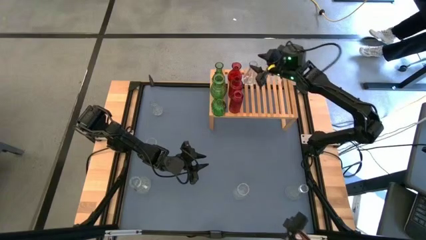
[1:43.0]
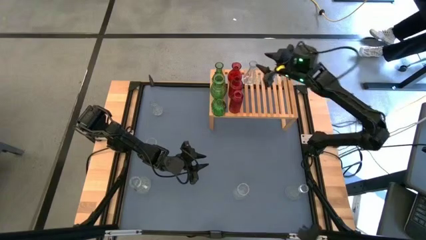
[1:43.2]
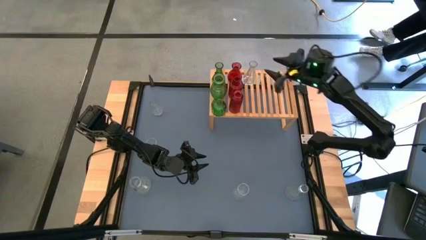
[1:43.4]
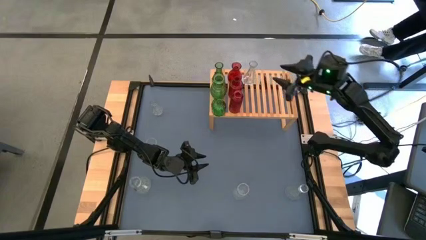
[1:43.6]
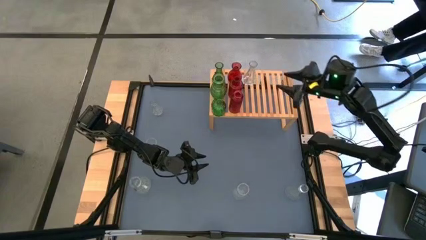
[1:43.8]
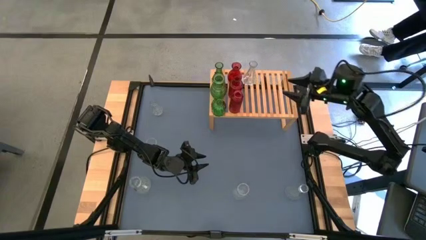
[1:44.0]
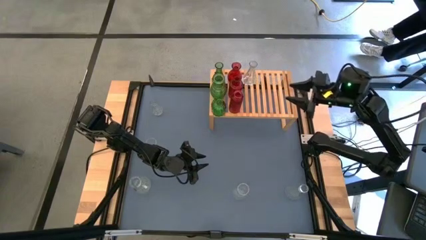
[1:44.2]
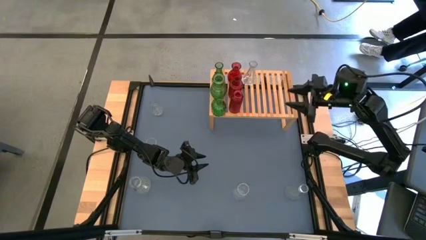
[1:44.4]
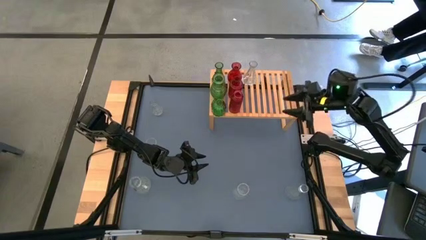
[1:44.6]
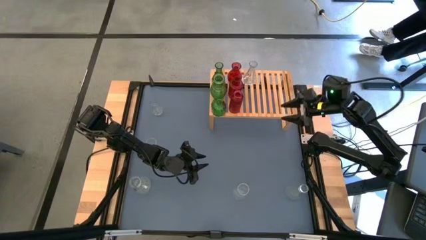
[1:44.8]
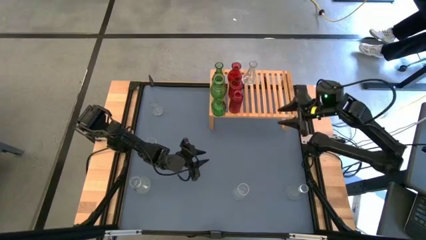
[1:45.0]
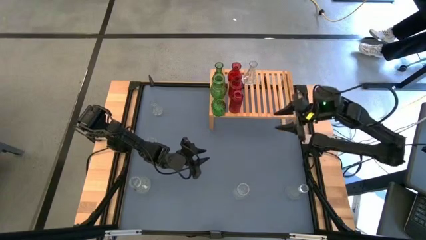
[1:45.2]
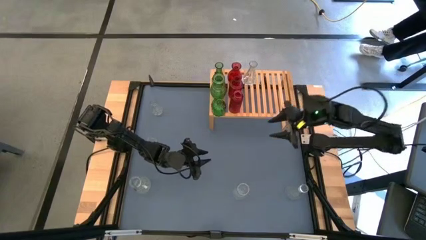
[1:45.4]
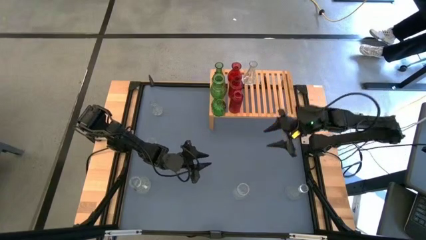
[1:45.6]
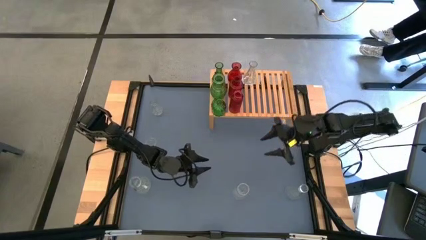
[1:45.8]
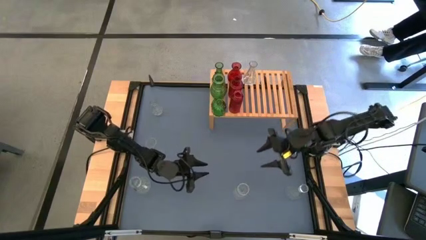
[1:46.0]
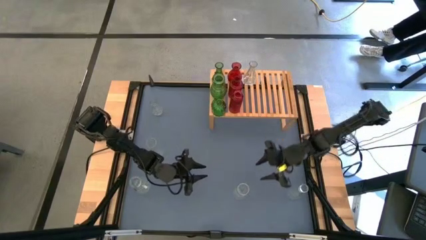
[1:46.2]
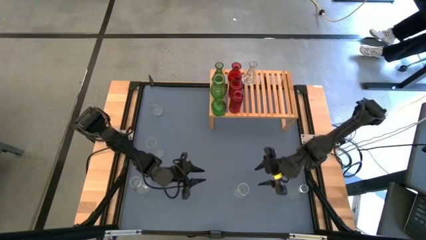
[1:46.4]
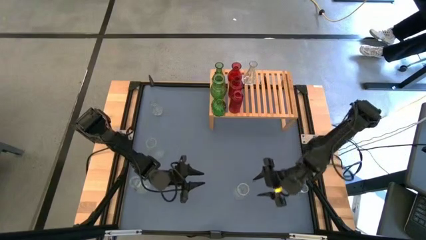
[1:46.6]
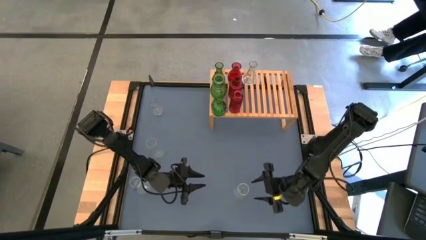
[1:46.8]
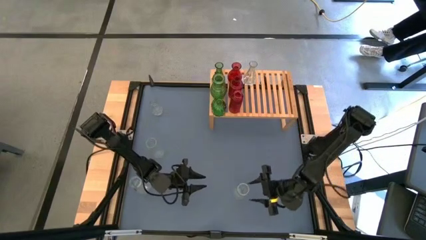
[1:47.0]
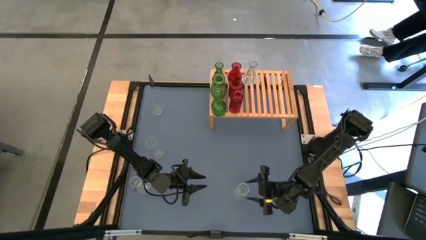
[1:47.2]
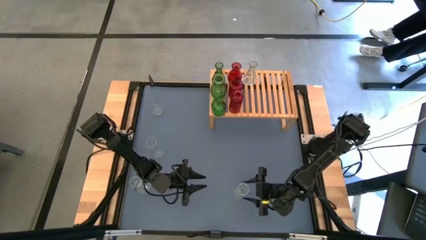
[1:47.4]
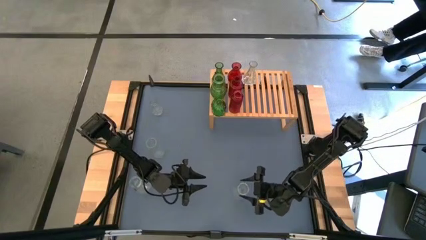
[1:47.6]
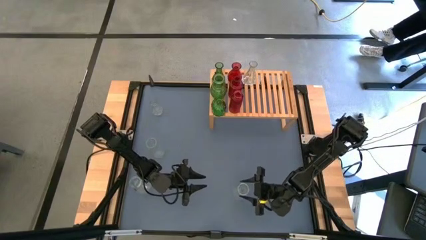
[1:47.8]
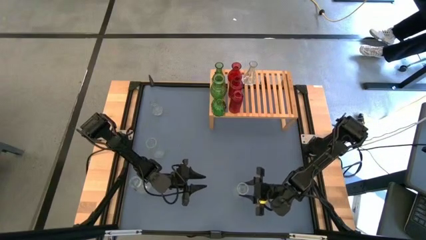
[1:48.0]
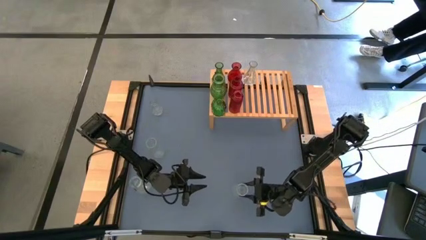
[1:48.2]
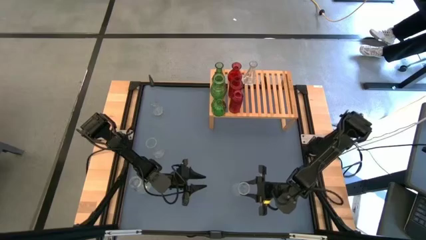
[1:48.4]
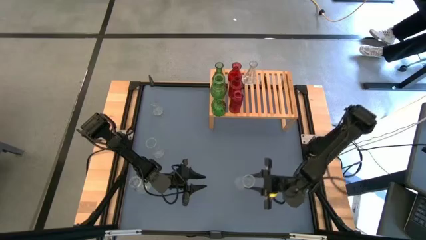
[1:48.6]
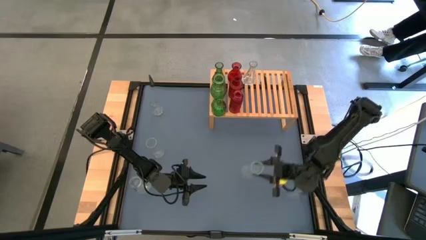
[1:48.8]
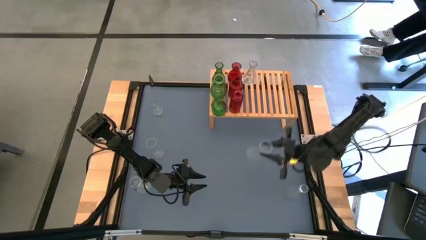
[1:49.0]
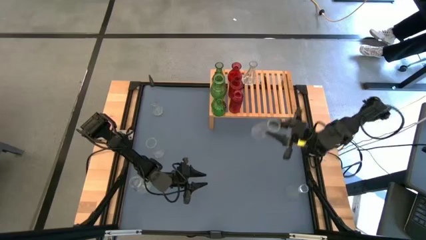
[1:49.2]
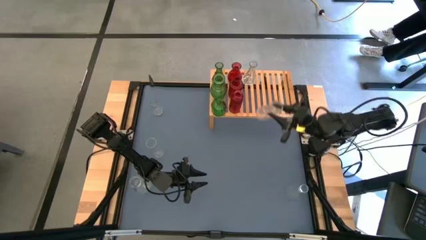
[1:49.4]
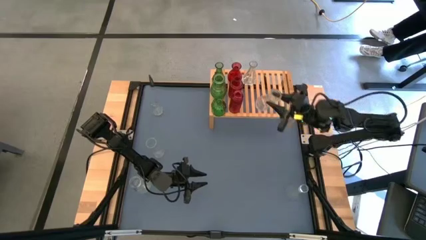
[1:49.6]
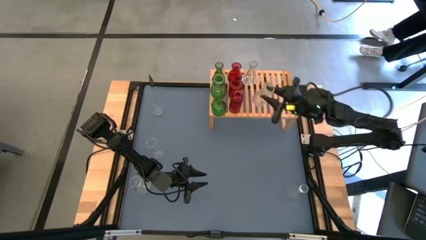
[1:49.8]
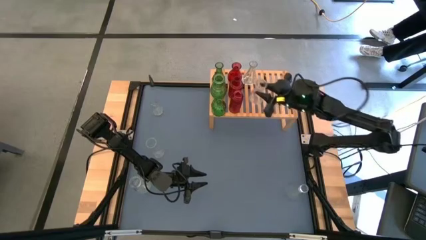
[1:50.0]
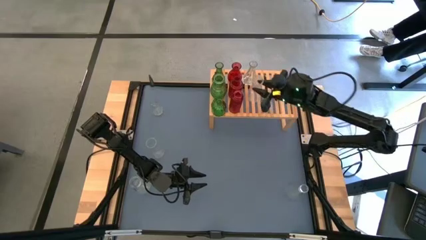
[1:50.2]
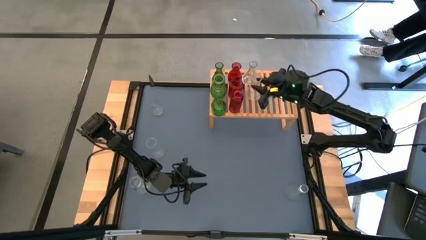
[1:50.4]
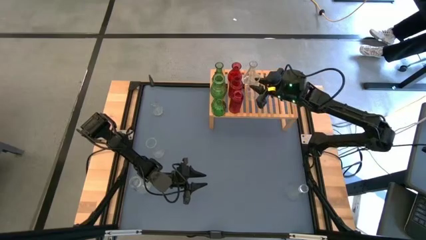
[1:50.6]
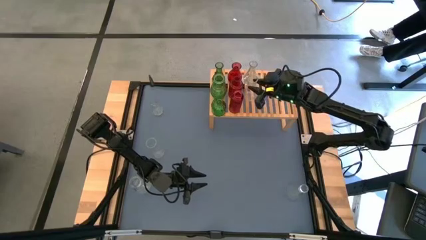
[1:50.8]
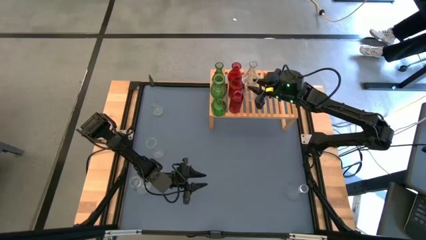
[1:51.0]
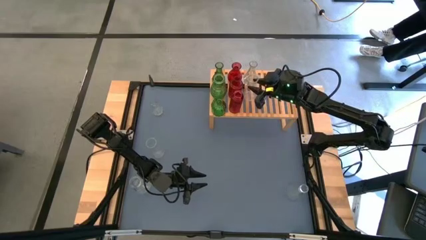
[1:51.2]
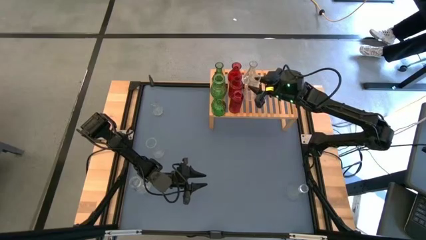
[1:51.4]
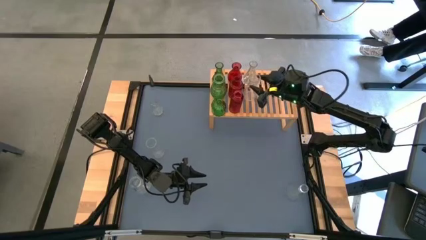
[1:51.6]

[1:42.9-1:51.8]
Task: sort vases onto shelf
Put the bottom center transparent vase on the shelf, aligned with the other transparent vase
